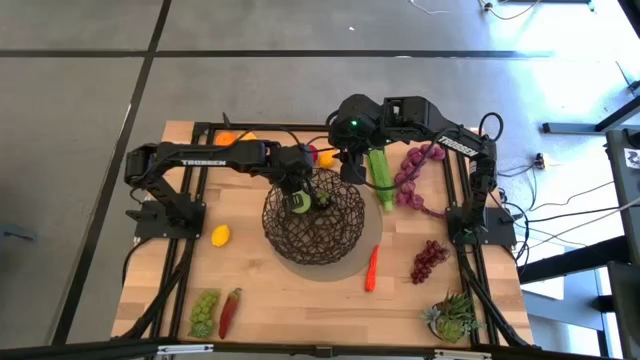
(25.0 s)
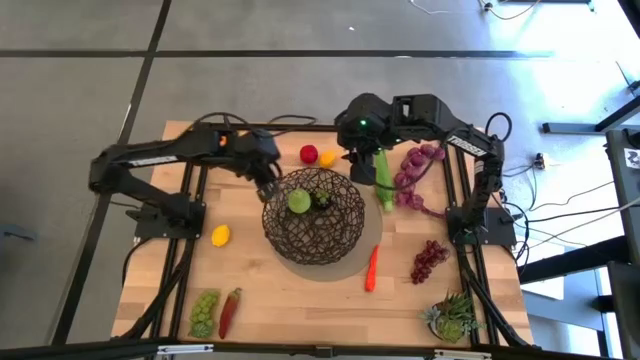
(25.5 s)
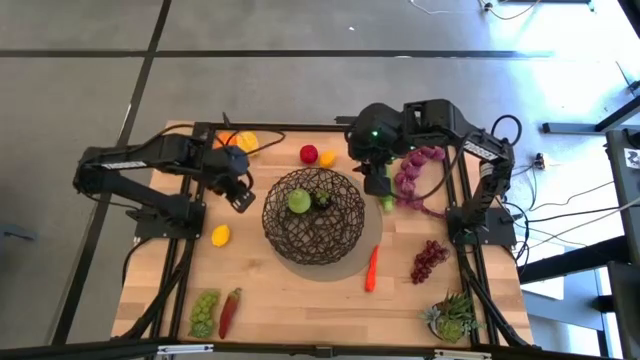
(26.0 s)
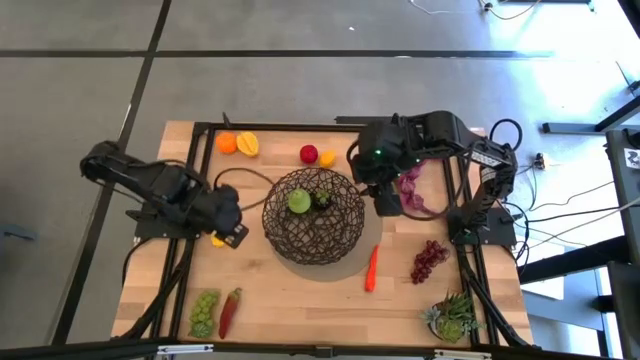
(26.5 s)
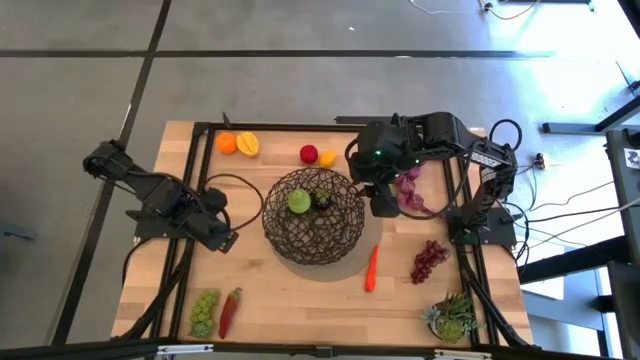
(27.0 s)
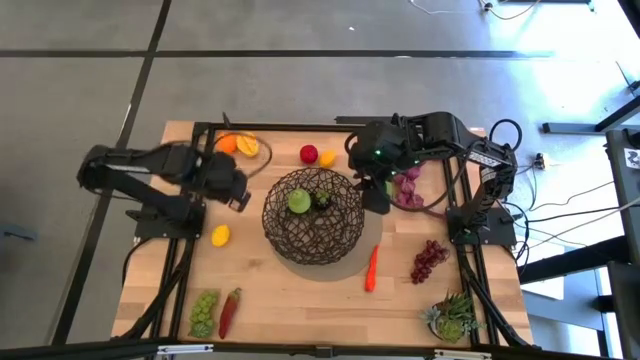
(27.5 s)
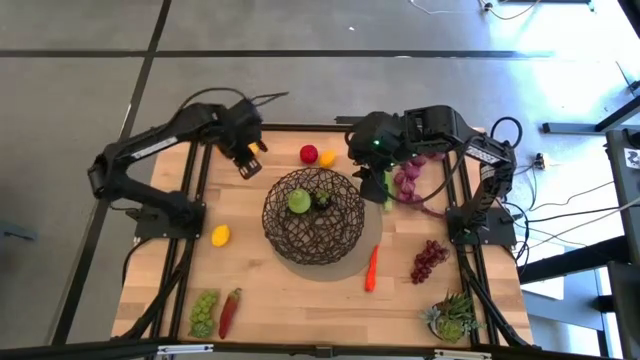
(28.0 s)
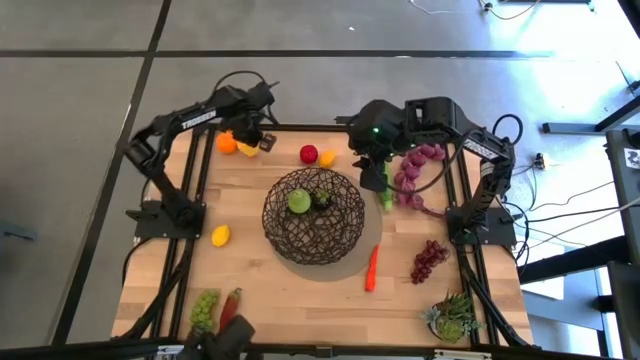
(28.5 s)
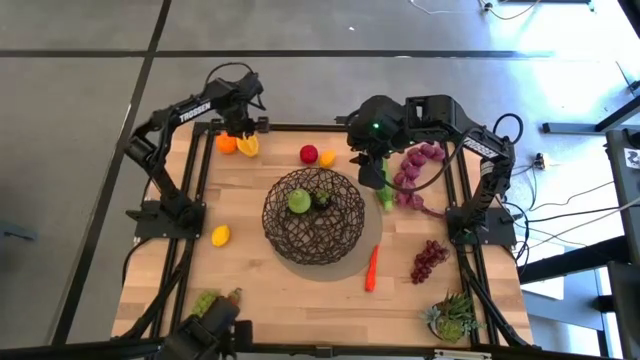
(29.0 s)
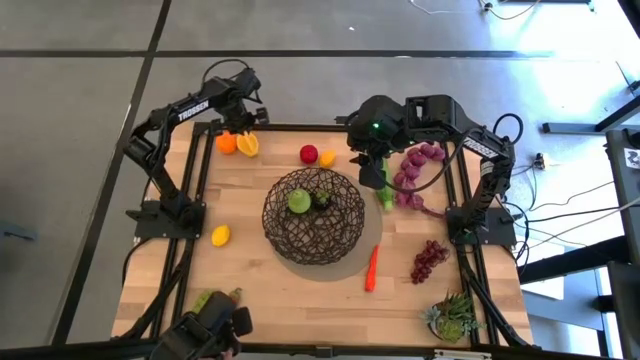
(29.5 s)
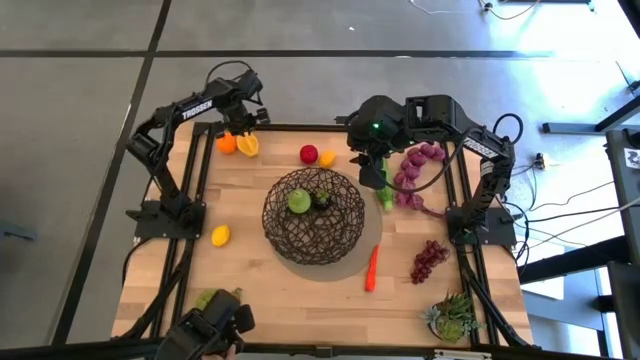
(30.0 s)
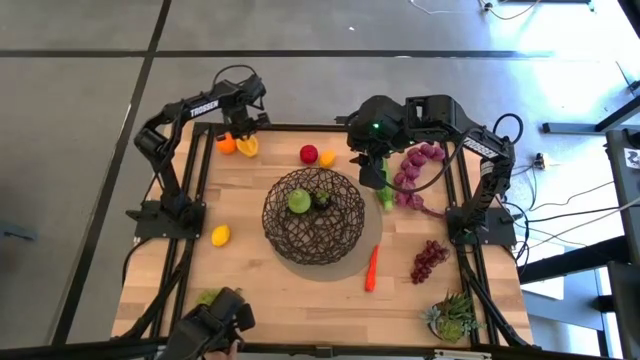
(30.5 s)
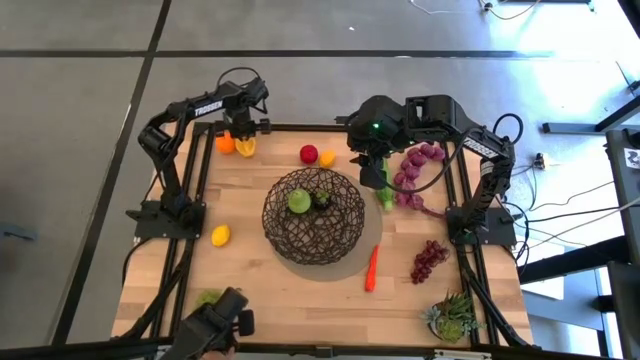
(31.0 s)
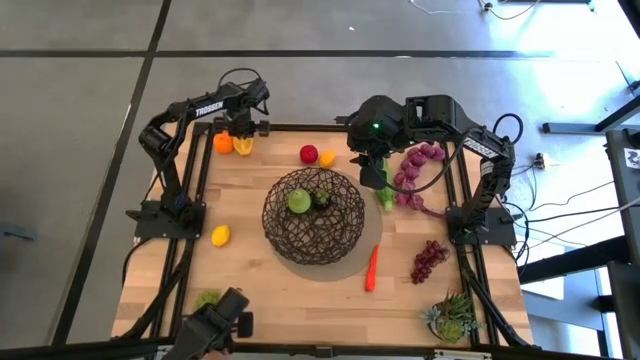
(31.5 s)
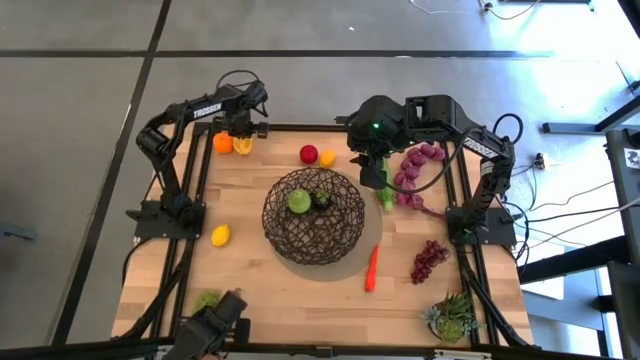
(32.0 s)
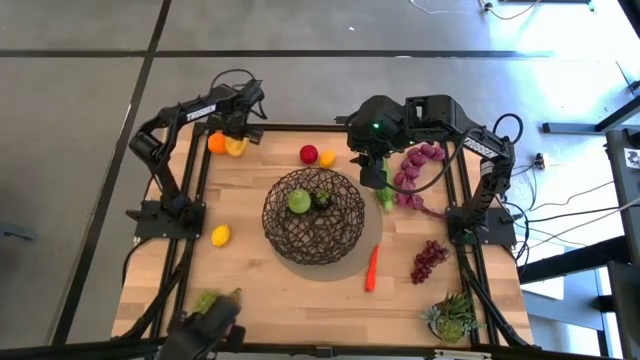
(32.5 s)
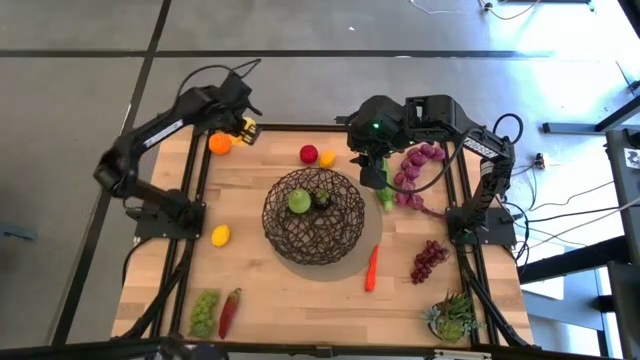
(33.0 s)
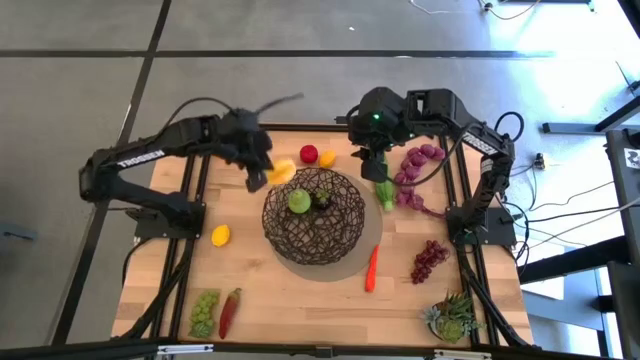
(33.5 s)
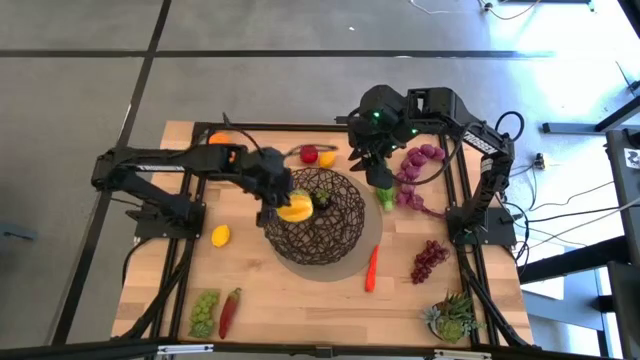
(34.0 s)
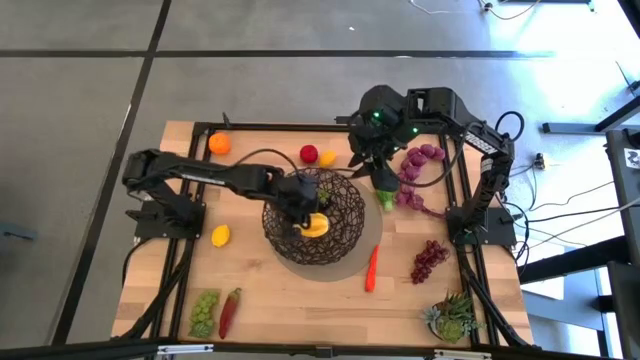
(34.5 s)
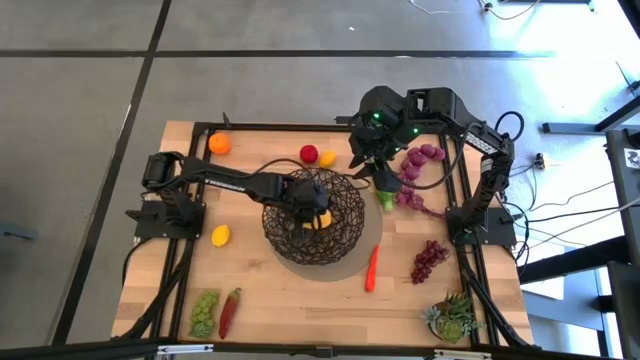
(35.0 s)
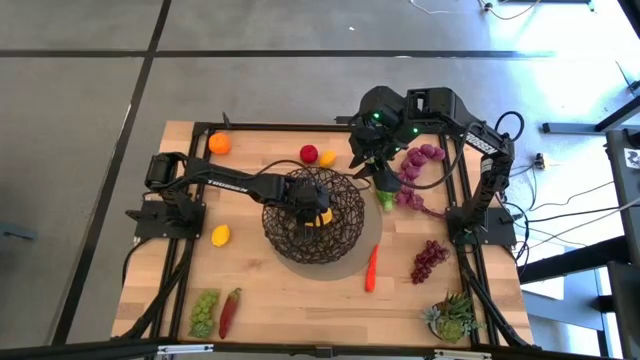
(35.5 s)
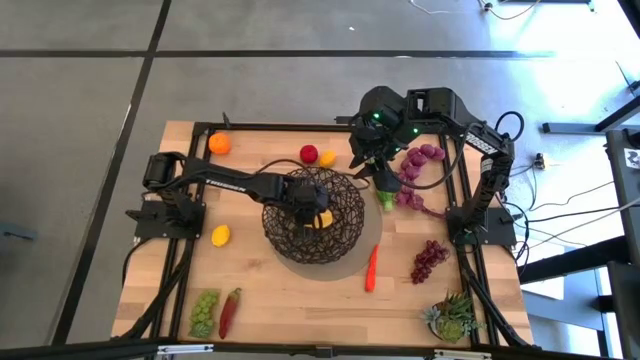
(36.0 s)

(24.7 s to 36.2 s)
Task: Build produce basket
Put the star fruit into the wire basket

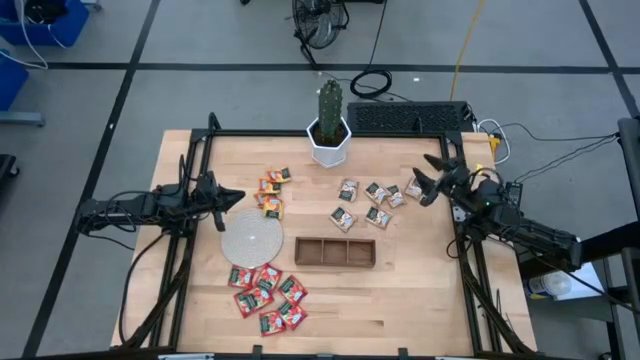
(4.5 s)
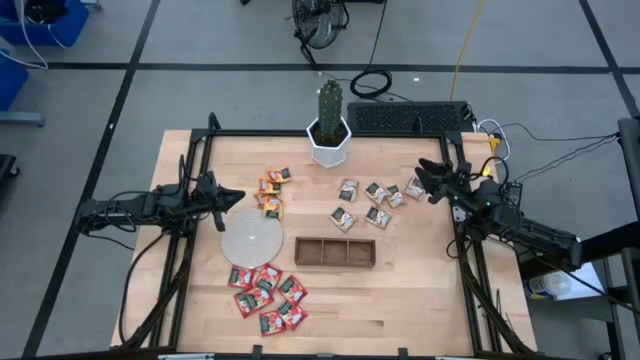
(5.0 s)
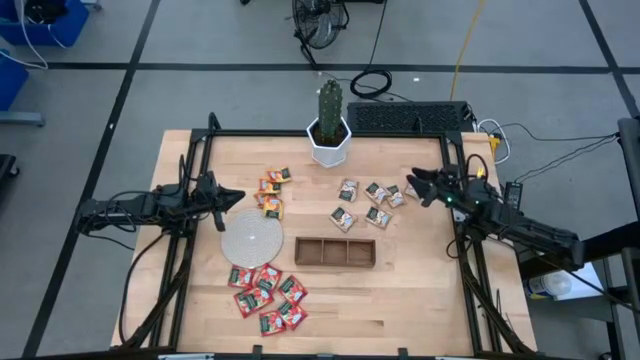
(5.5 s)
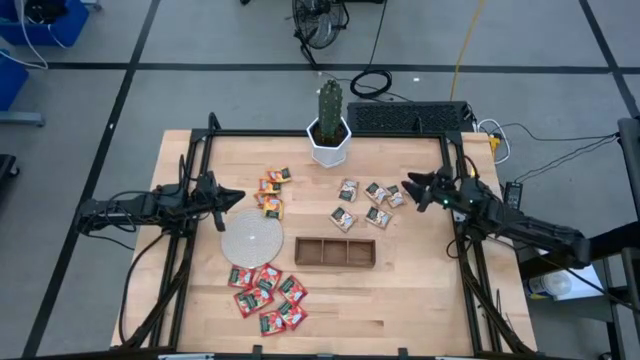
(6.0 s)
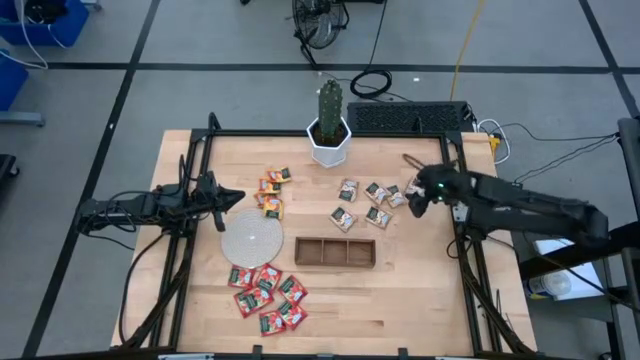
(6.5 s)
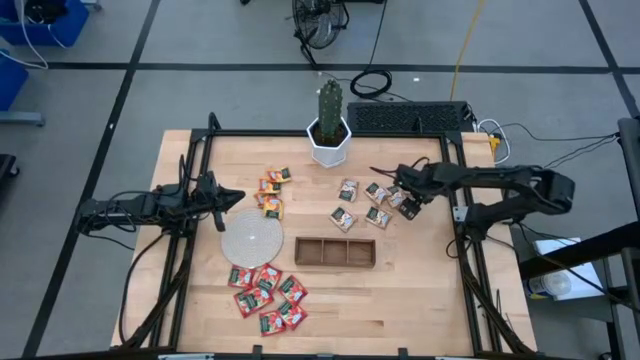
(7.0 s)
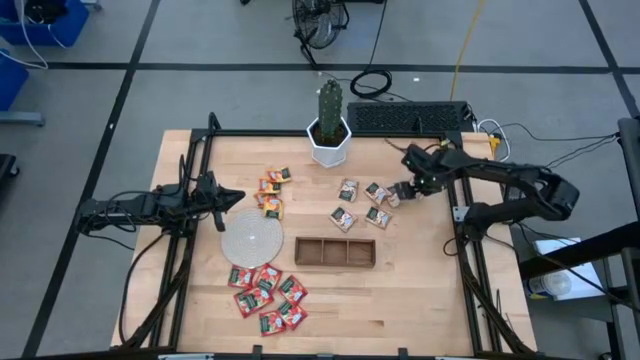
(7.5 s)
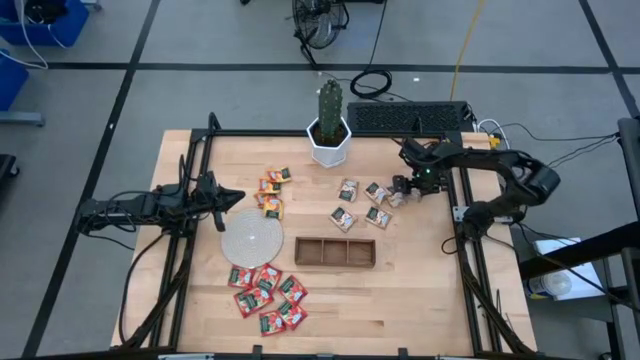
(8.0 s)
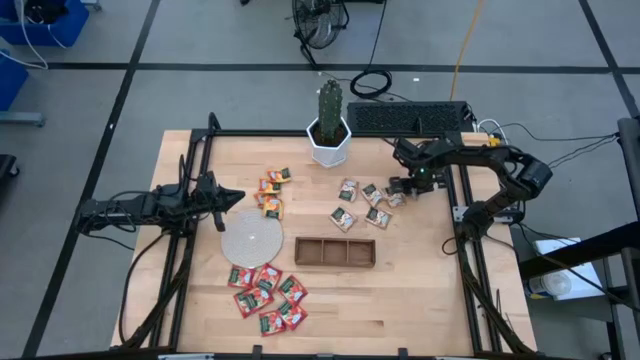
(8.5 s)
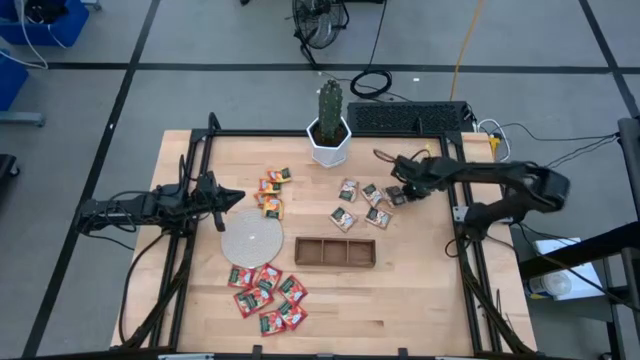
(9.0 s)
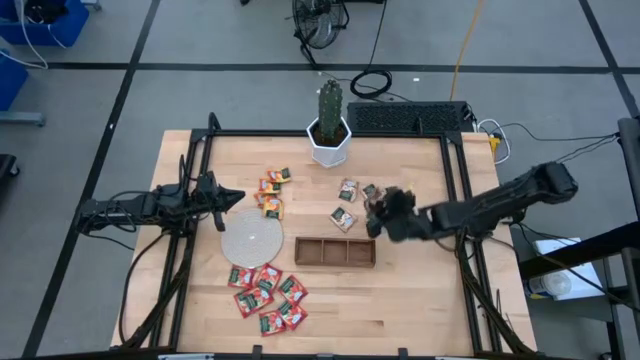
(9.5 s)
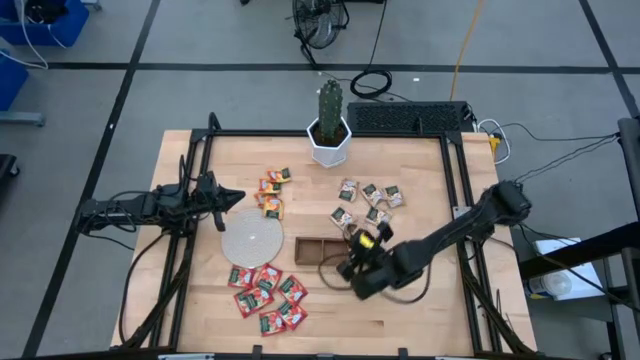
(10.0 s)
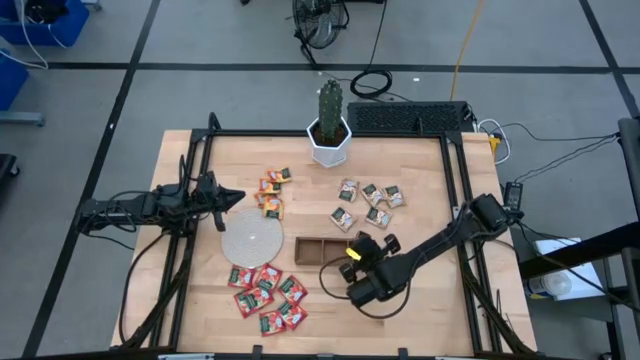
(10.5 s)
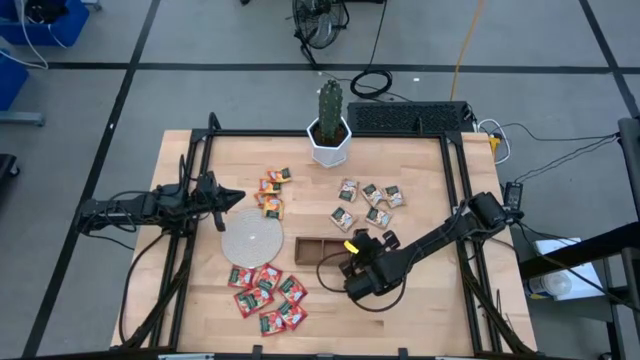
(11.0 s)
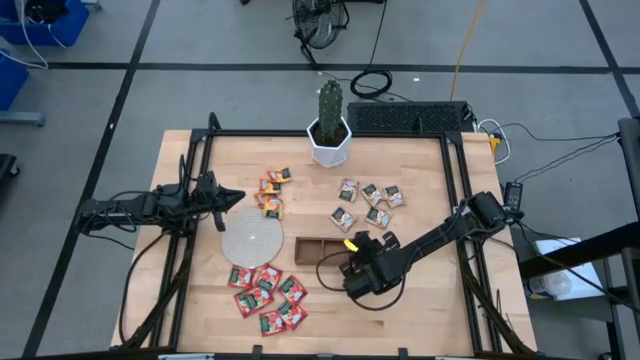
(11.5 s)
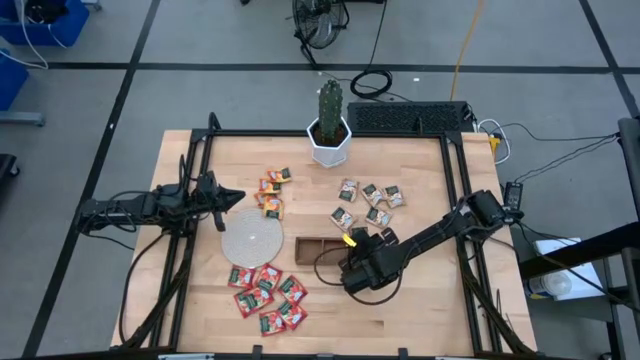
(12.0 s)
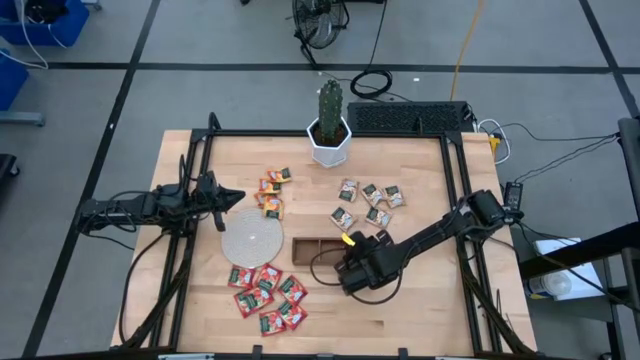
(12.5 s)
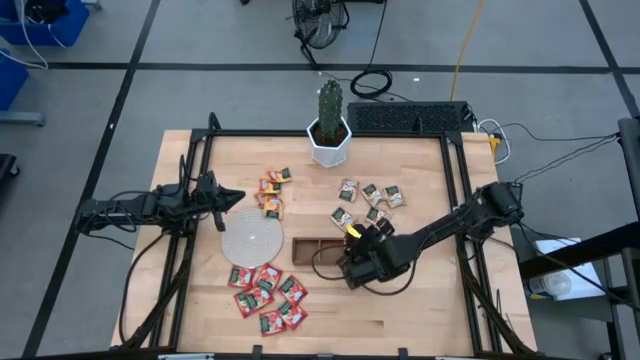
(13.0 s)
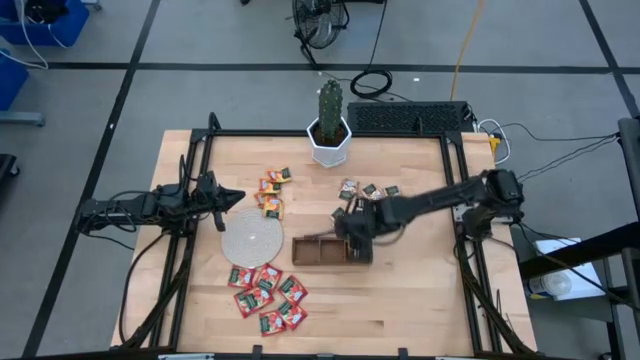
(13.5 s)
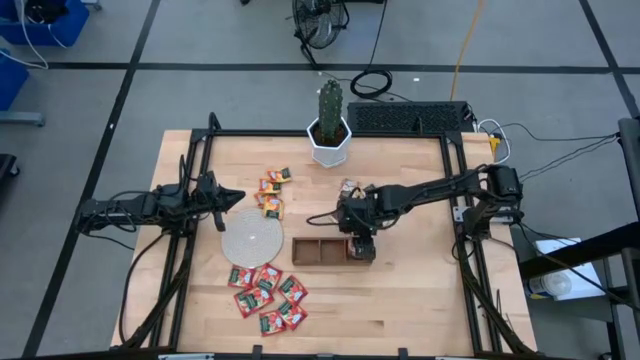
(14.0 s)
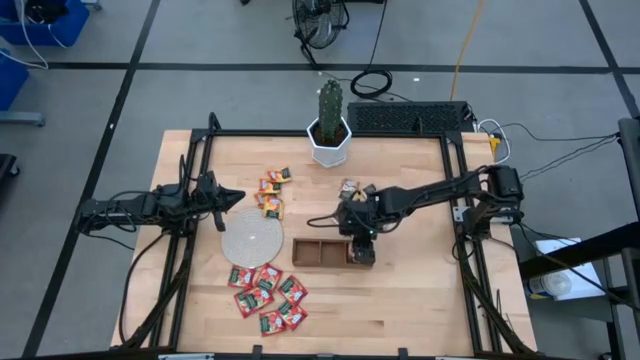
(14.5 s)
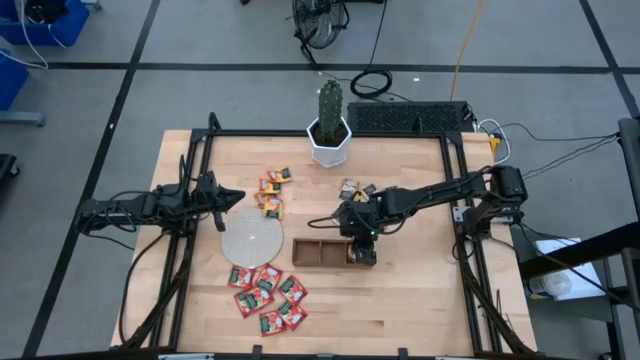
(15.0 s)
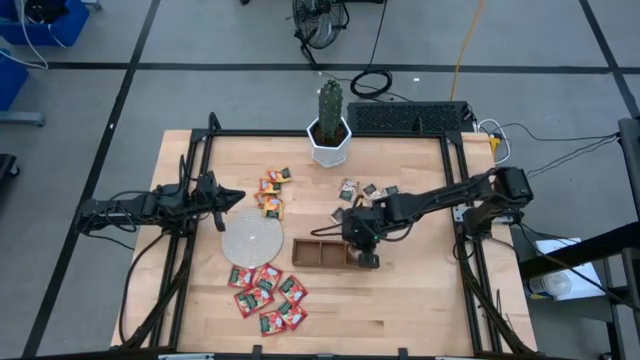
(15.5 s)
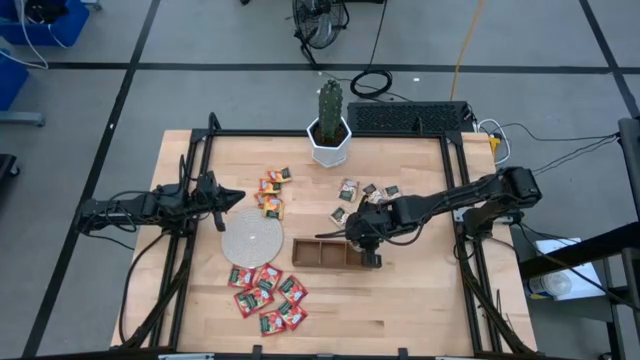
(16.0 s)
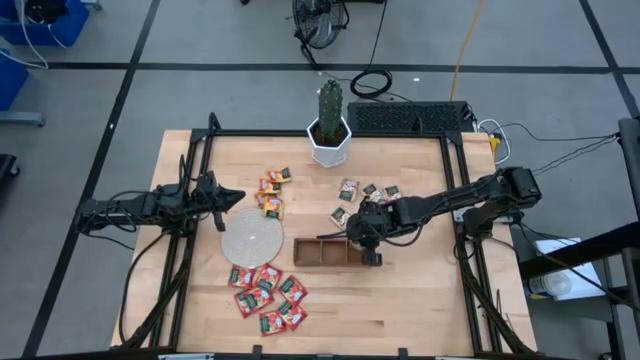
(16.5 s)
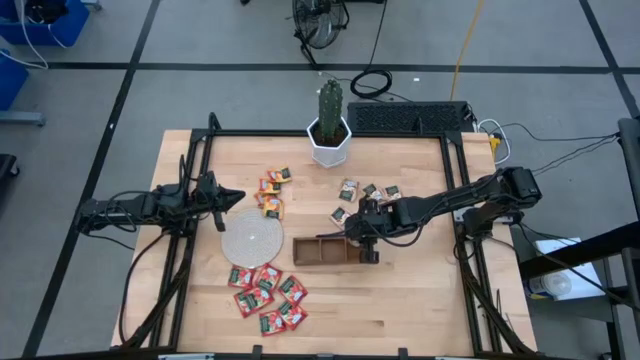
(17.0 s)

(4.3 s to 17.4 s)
Task: Pick & Place Tea
Put the brown tea bag into the right section of the wooden organizer
